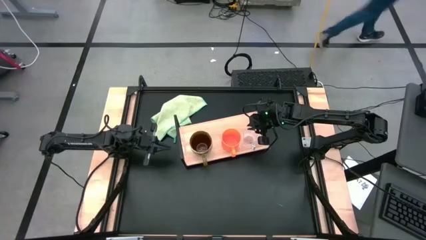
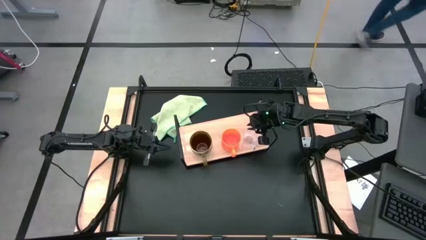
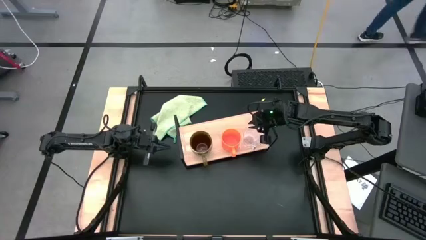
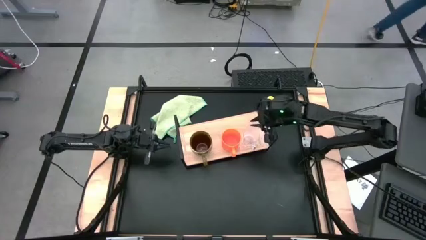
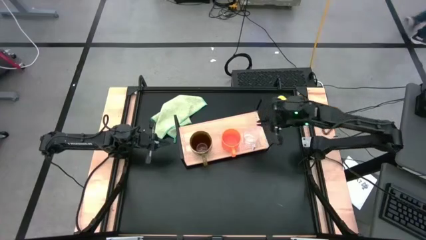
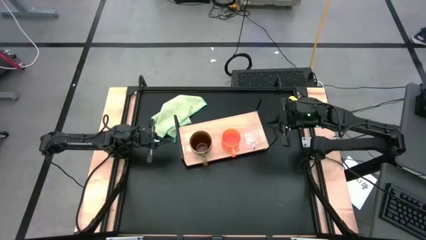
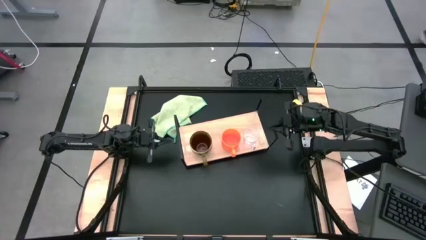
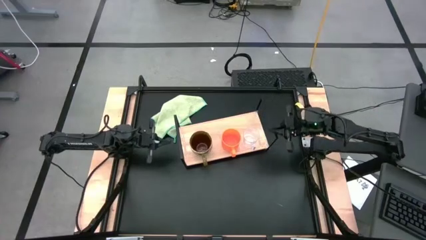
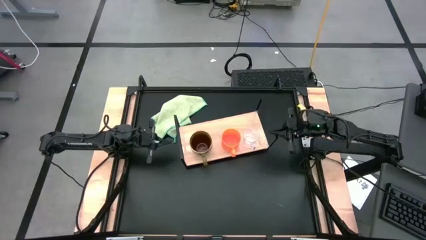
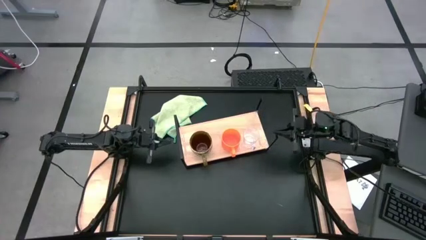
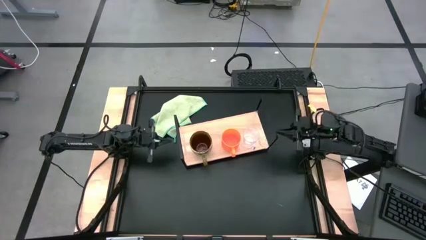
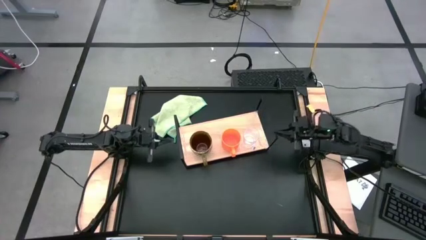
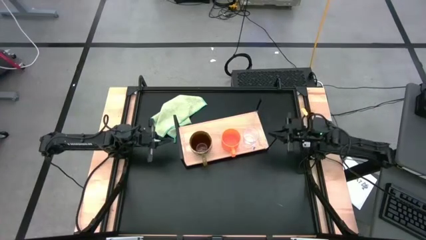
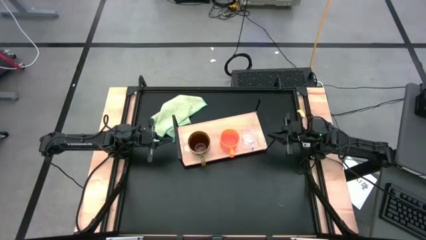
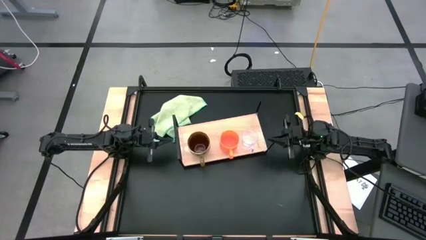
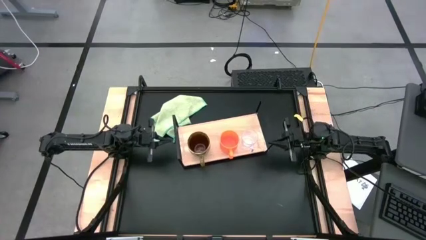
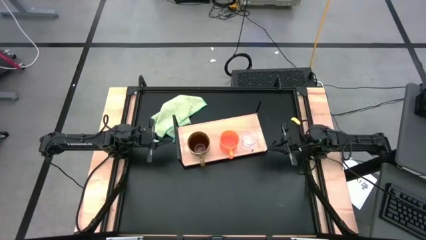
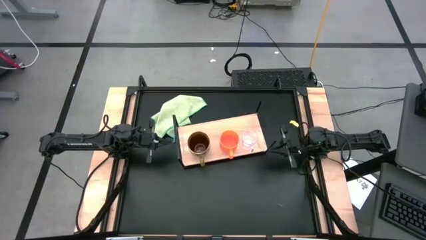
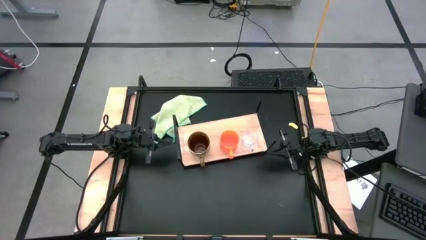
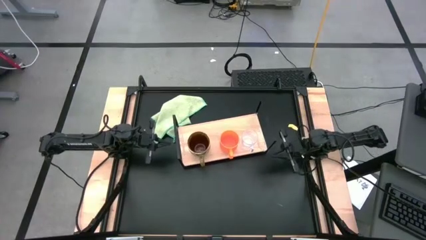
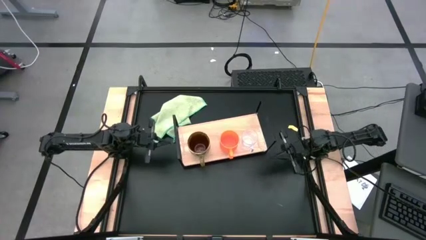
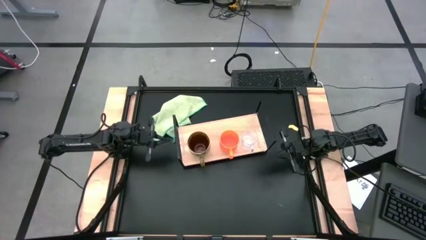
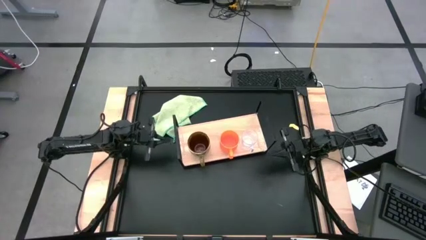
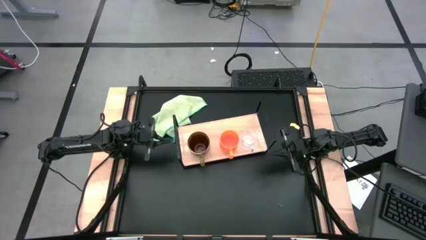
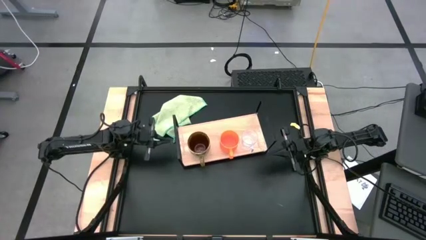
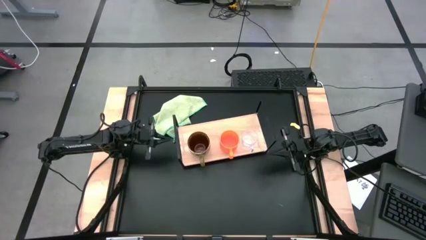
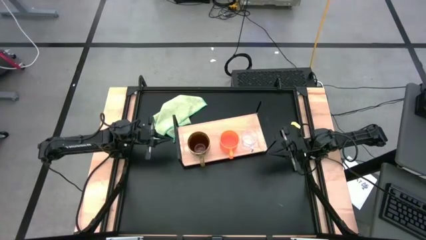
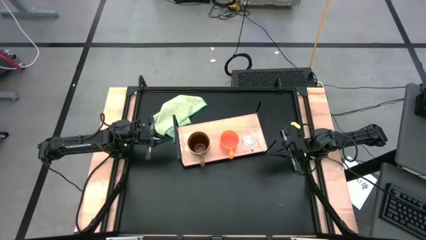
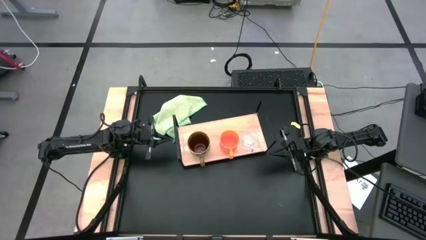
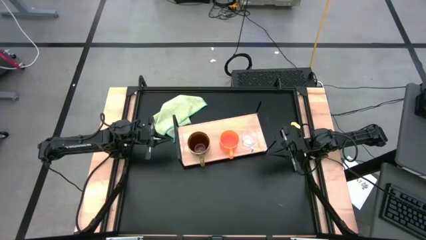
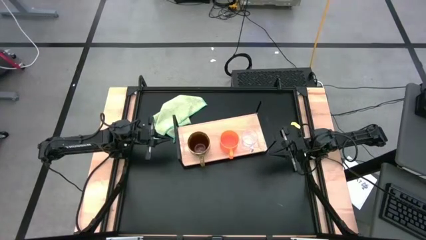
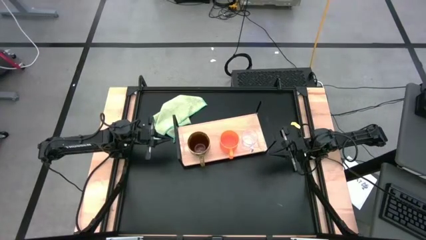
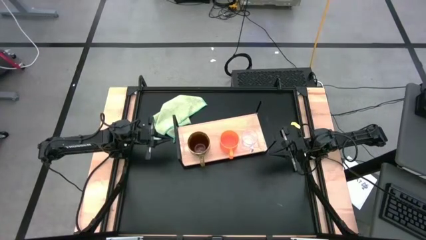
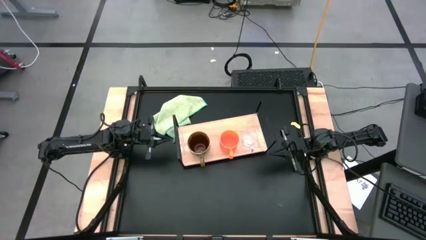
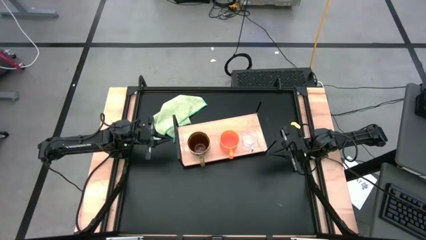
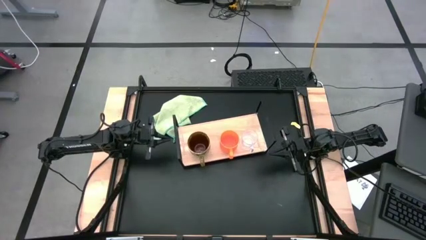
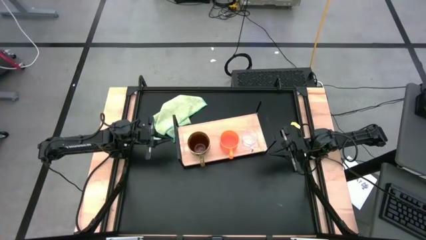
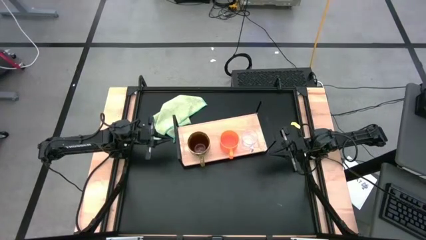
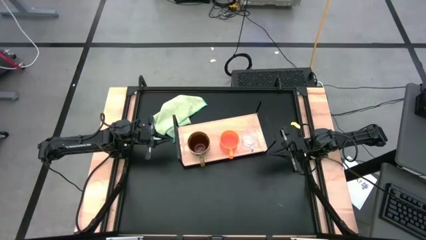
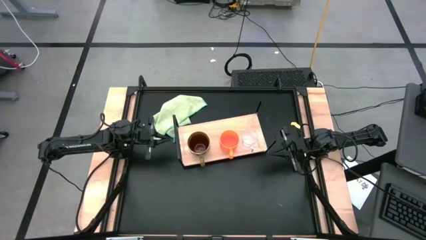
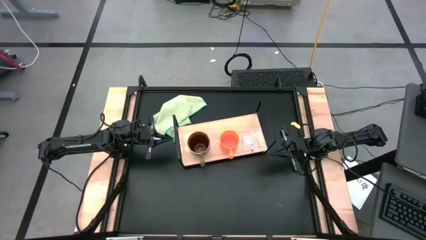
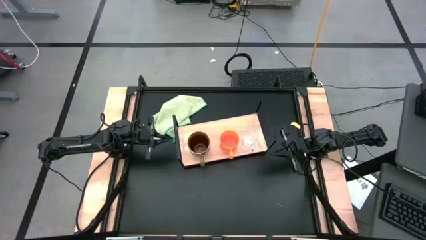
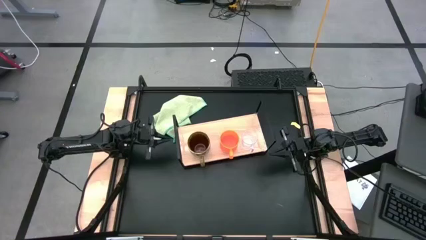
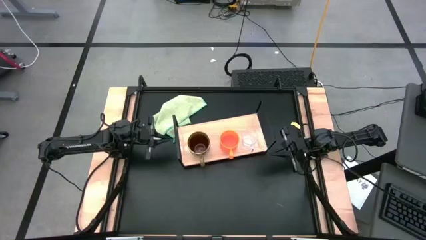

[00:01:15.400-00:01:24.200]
Task: Stack small to large cups/mugs on shelf
Return to Home Position

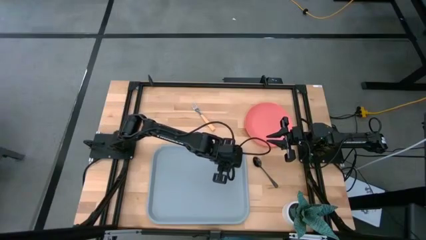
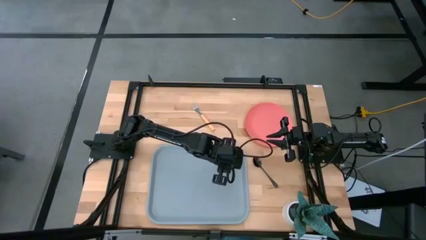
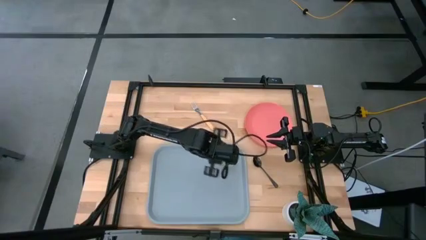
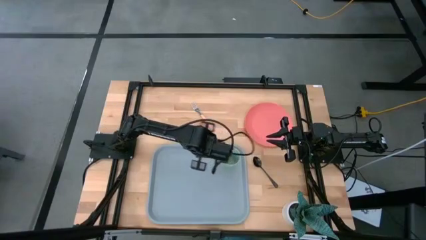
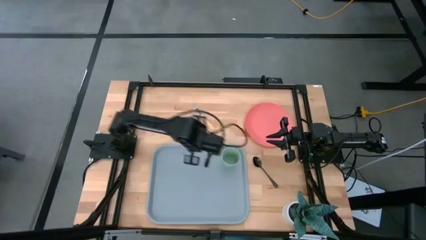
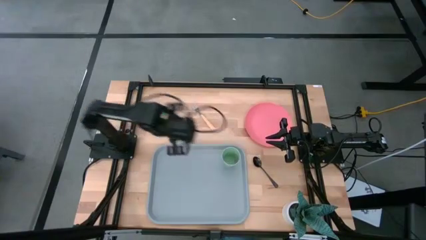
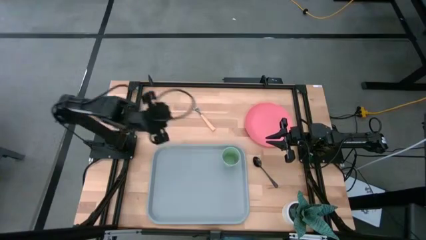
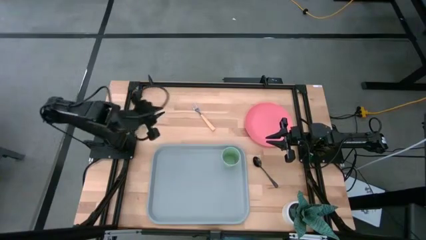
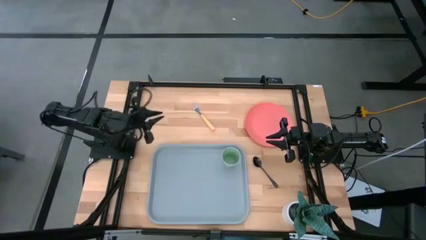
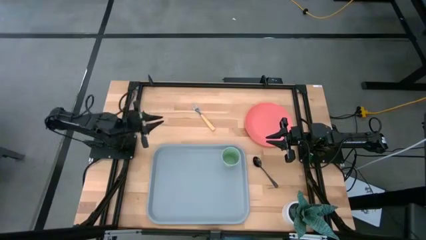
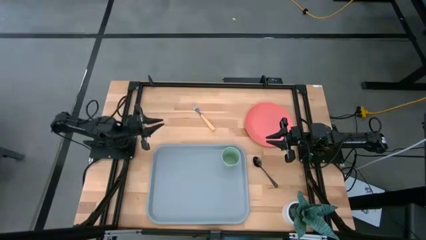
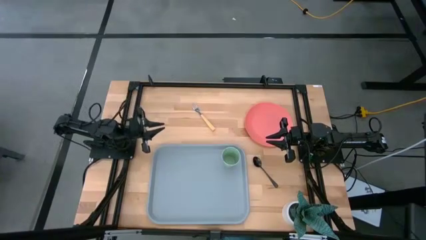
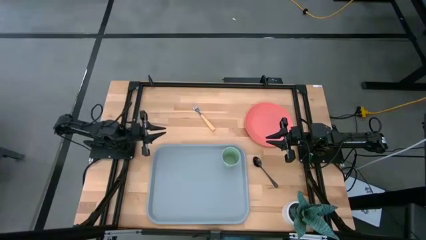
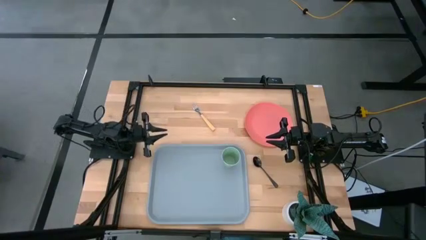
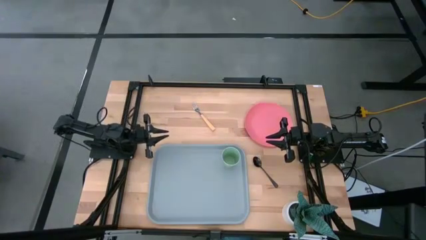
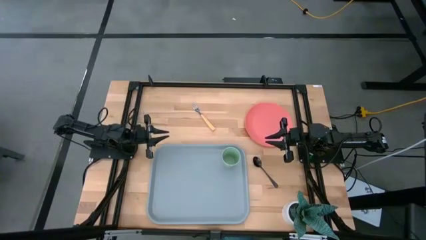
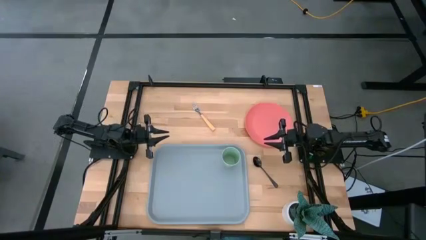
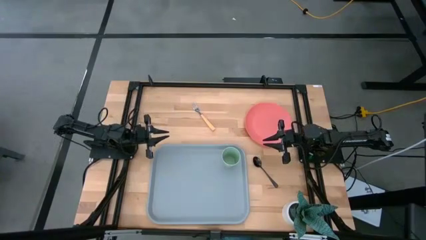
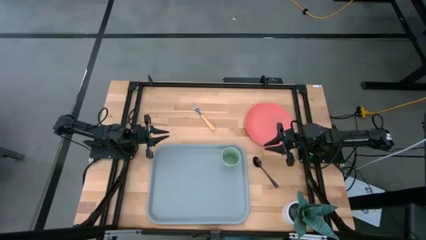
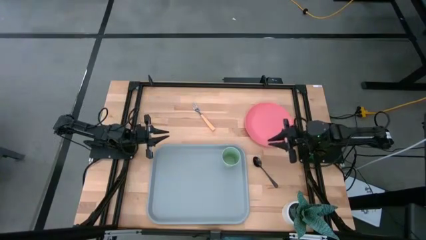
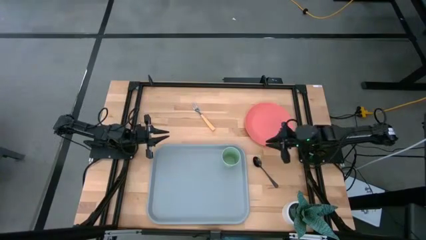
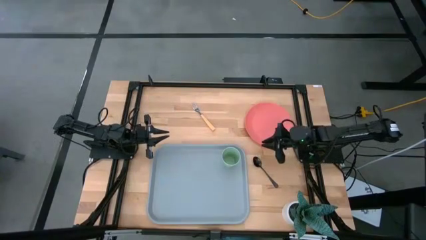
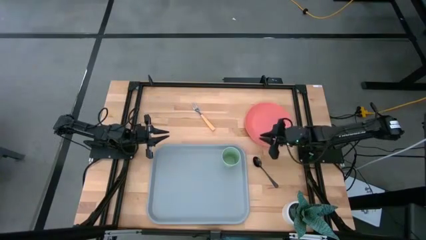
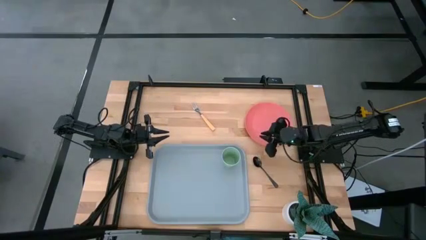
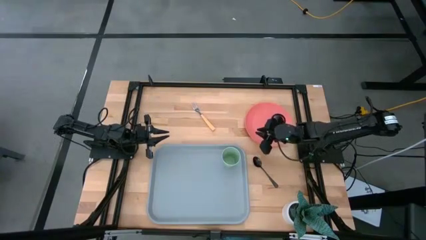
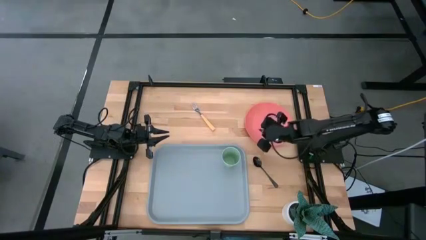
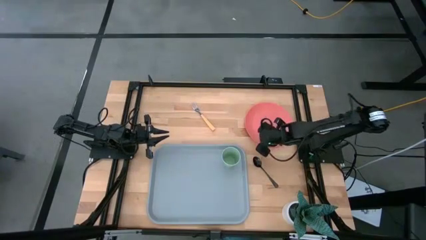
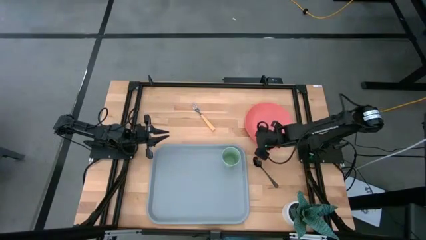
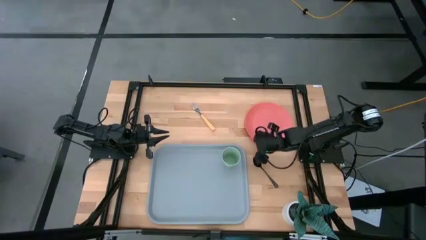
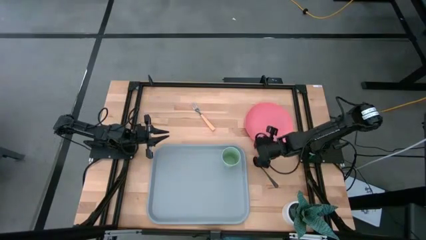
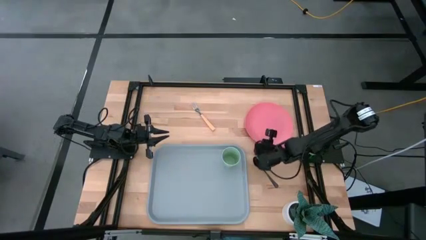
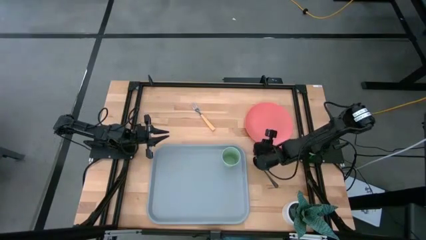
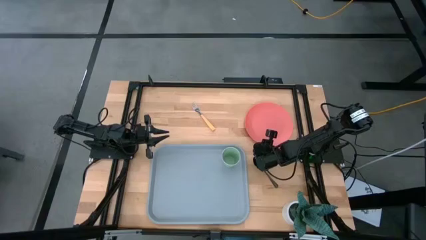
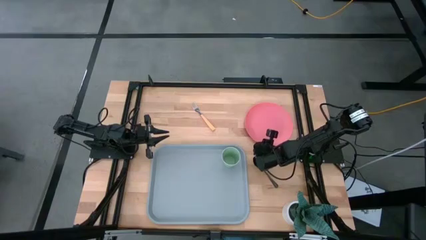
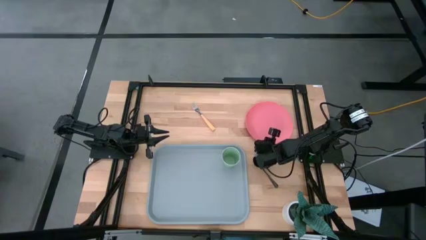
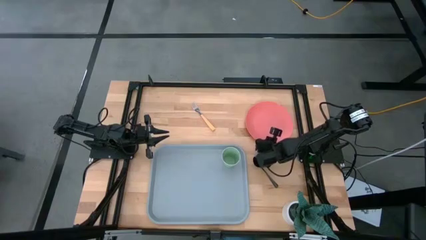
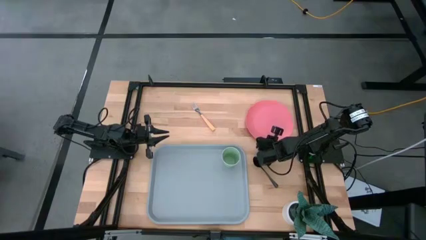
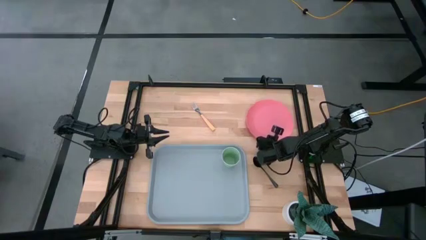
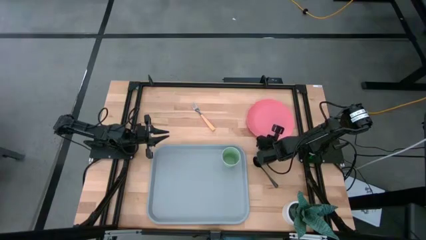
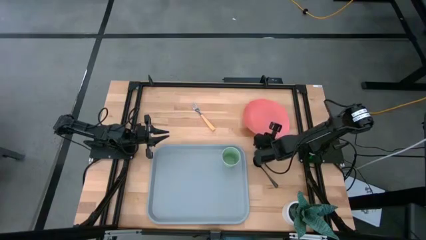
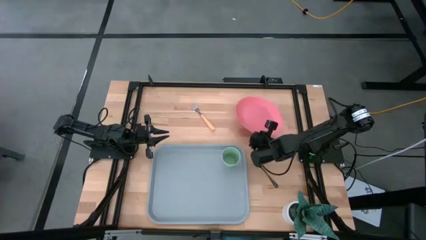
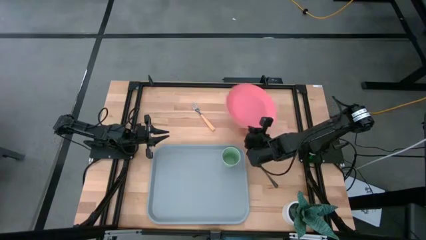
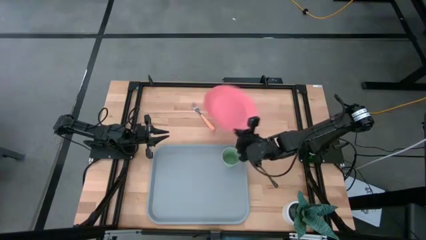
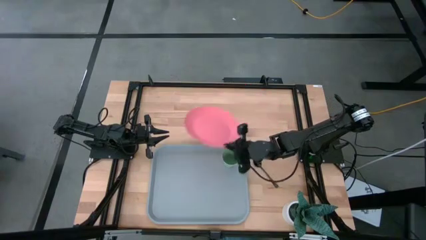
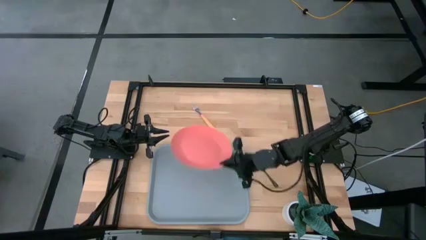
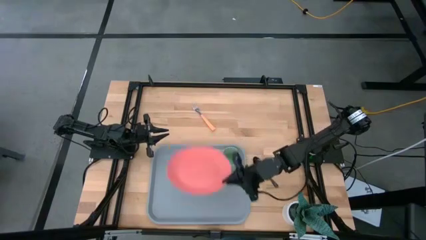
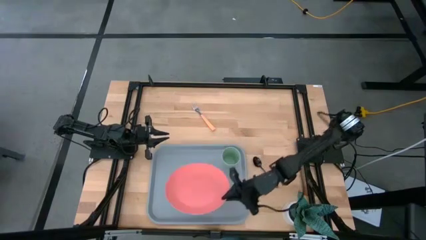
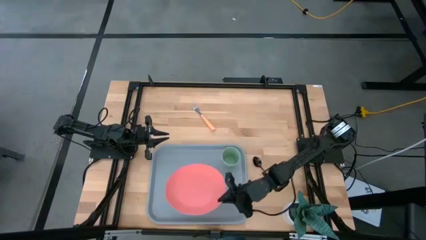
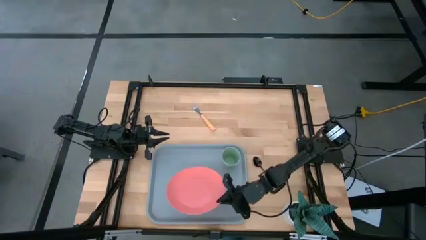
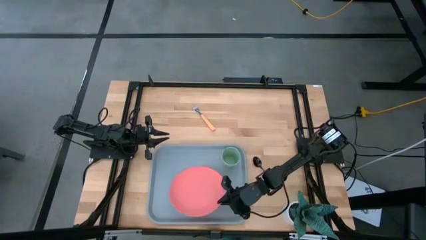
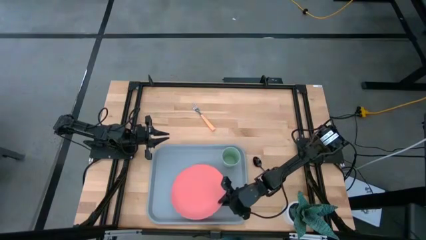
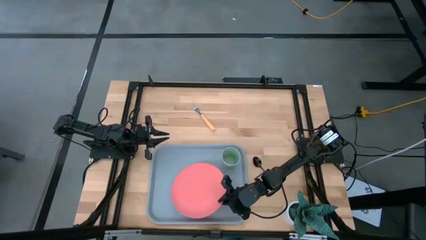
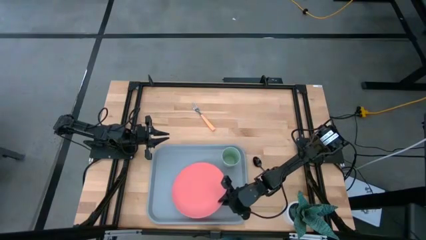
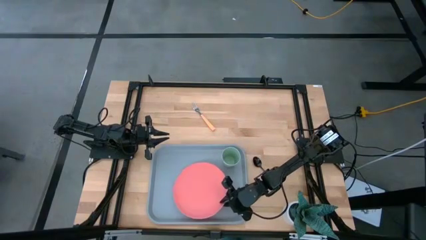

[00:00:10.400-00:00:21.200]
Task: Pick and place plate/cup/fork/spoon on tray
Put the pink plate on the gray serving tray to the bottom left of the green cup
